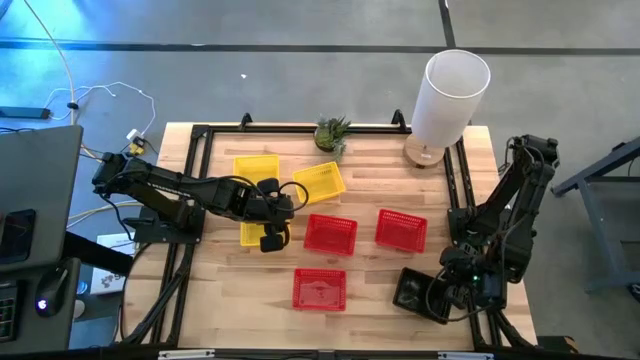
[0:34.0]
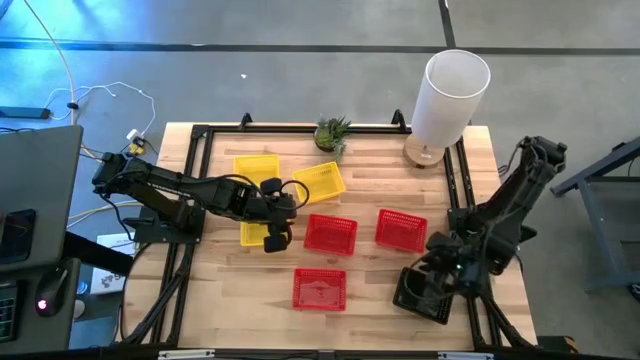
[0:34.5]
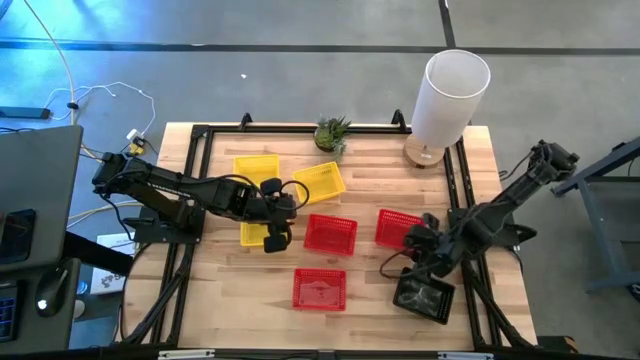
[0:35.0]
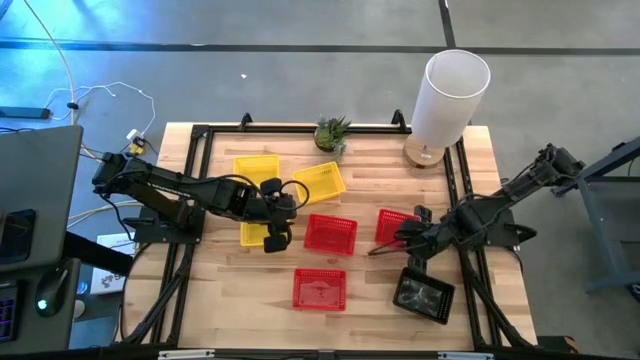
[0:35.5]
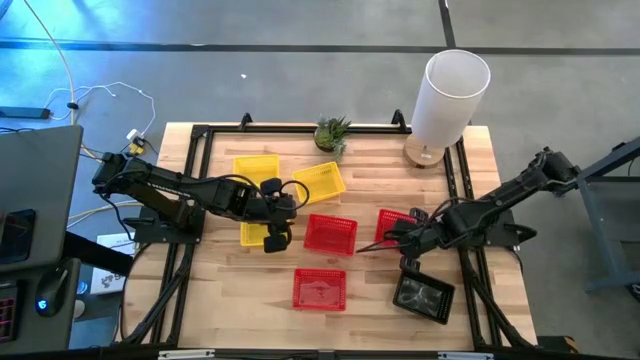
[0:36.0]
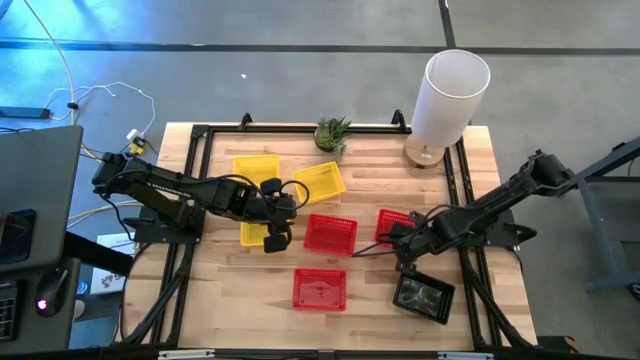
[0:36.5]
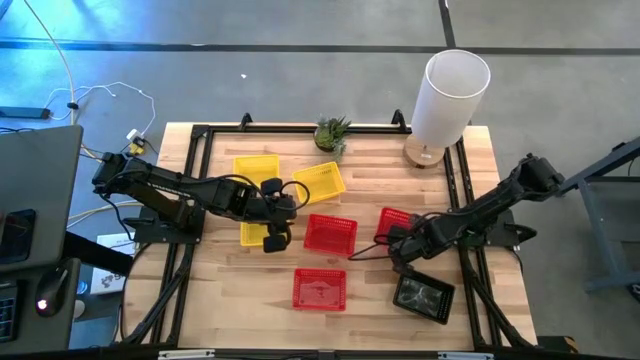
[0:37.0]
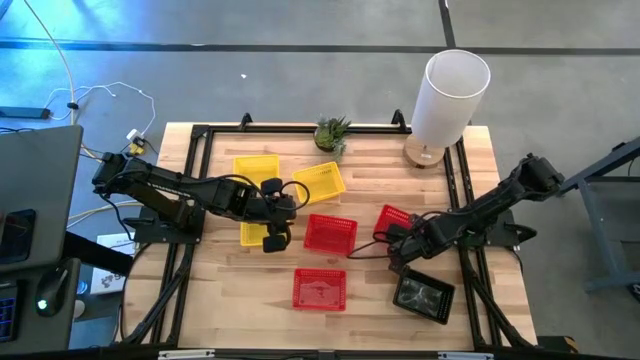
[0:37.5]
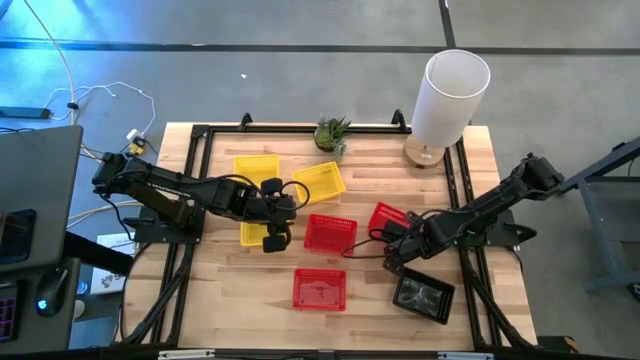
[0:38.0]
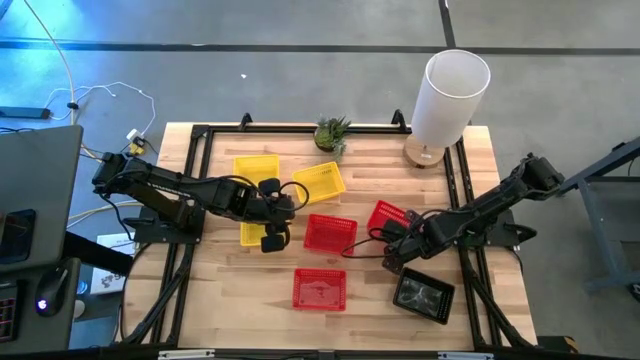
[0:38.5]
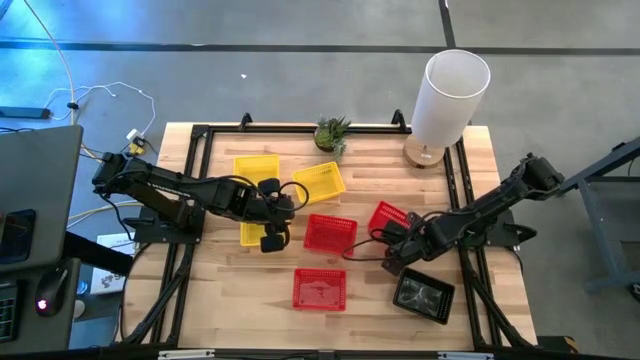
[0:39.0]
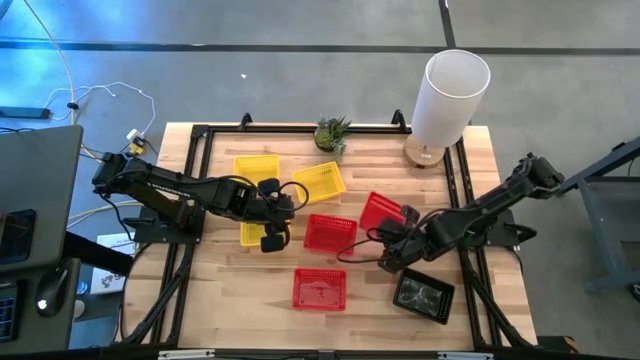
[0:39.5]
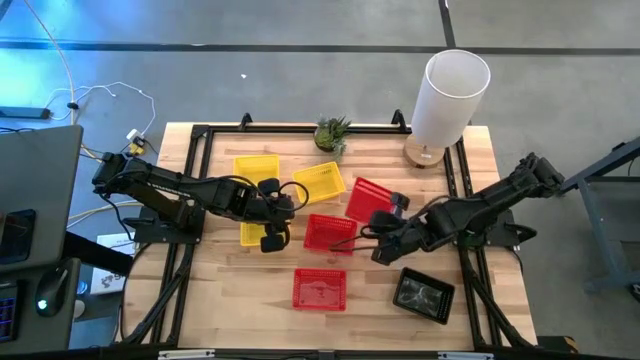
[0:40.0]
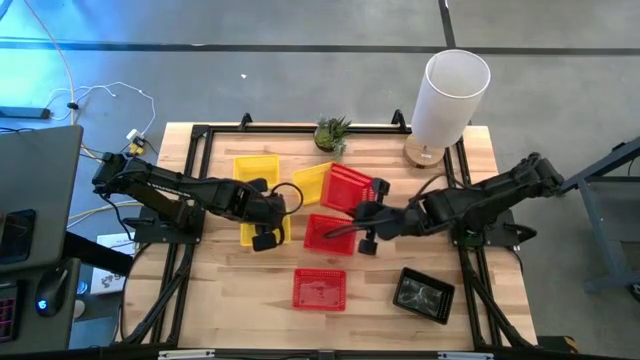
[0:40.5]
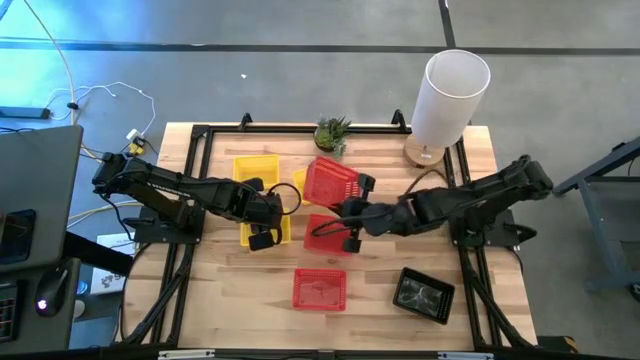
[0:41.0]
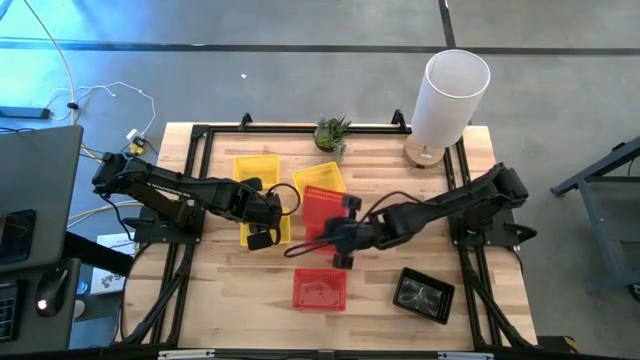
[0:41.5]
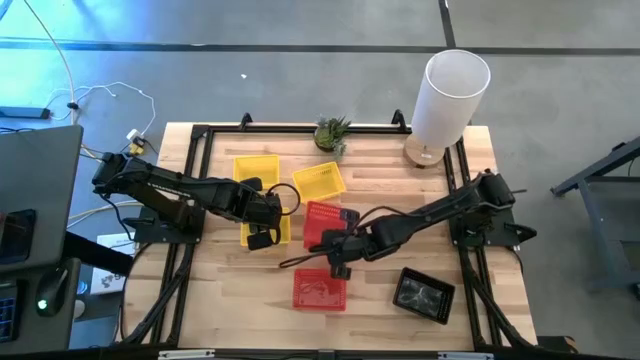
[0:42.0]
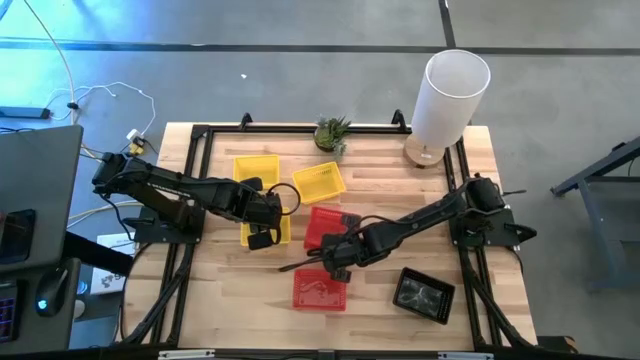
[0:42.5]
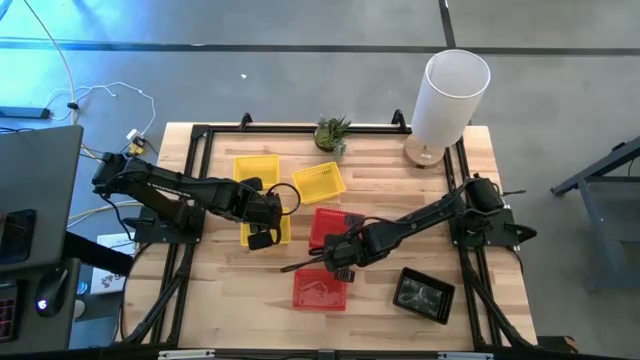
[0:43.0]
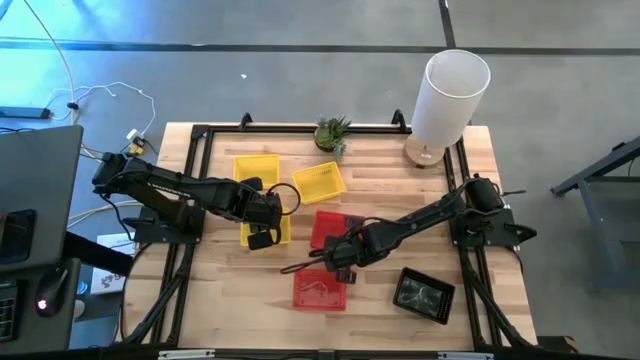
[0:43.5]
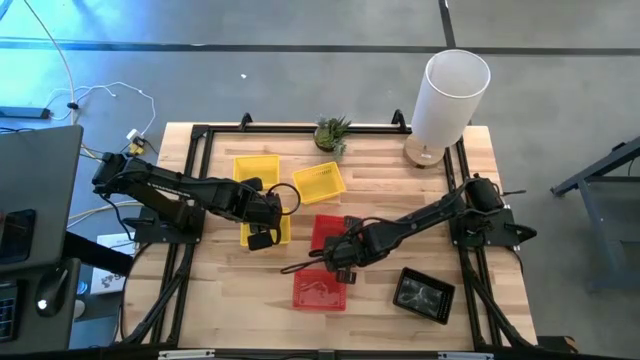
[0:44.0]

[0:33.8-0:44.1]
Stack the top right red bin on top of the top left red bin

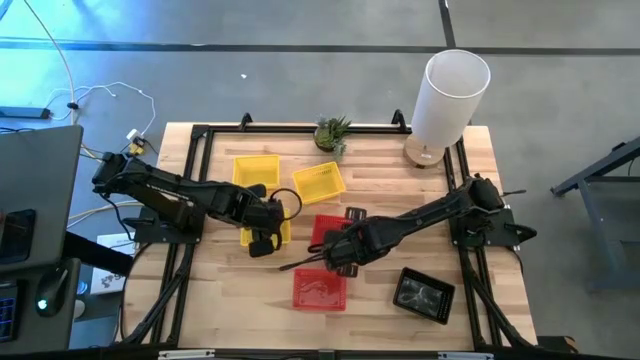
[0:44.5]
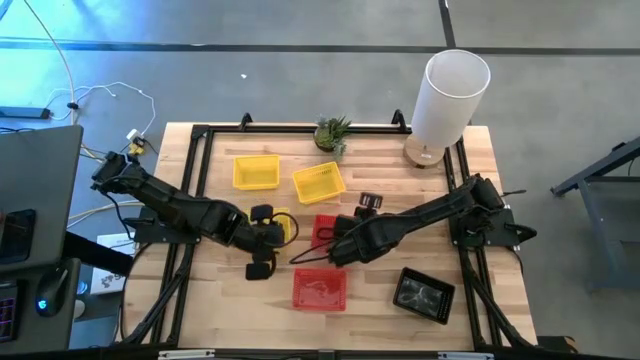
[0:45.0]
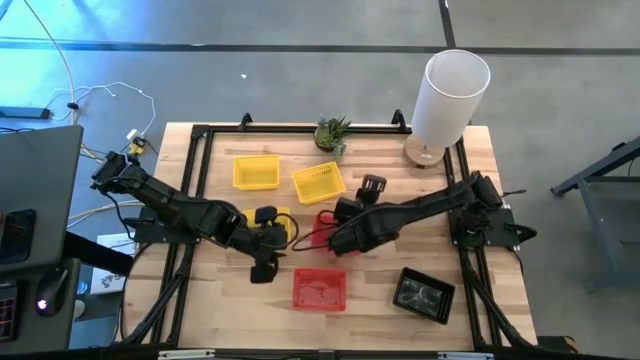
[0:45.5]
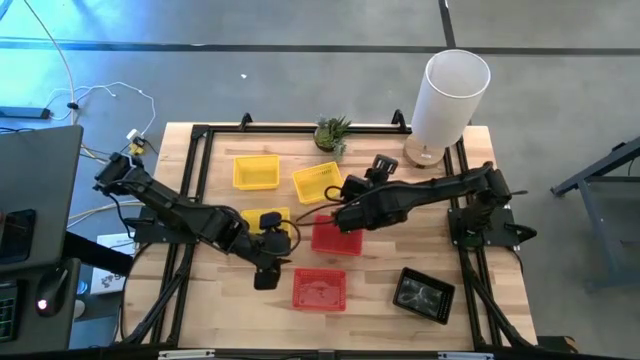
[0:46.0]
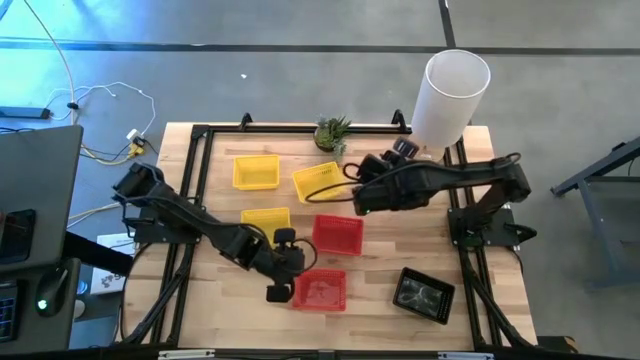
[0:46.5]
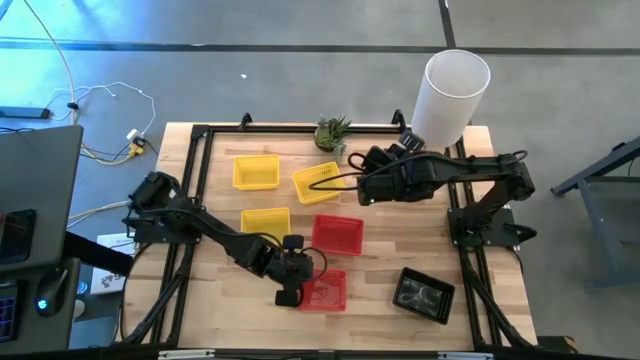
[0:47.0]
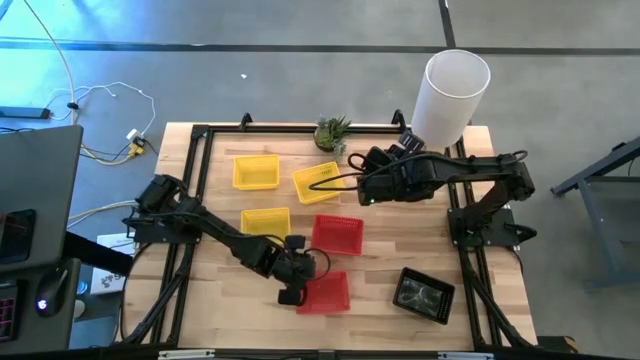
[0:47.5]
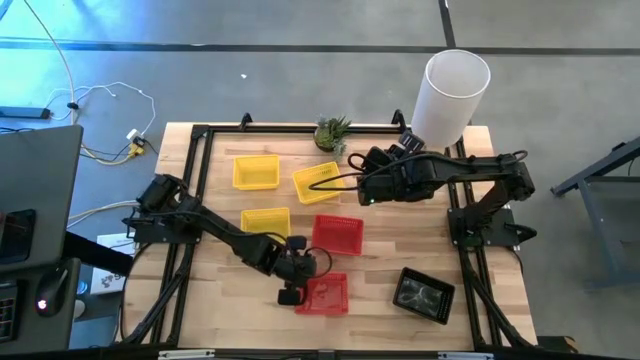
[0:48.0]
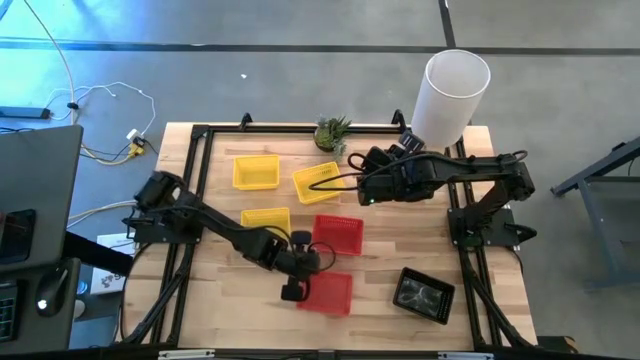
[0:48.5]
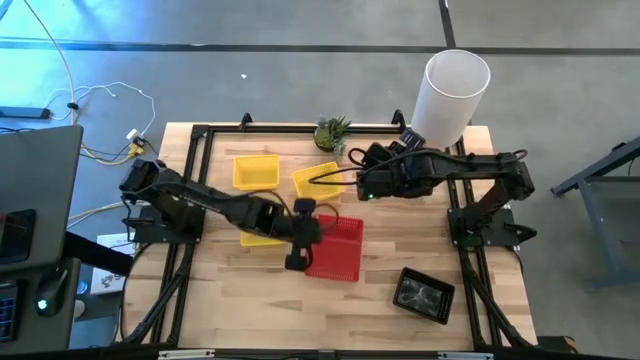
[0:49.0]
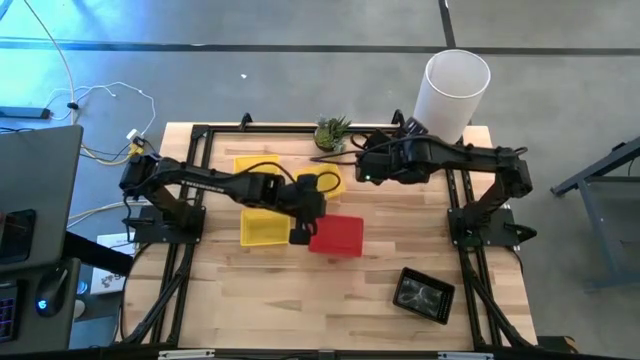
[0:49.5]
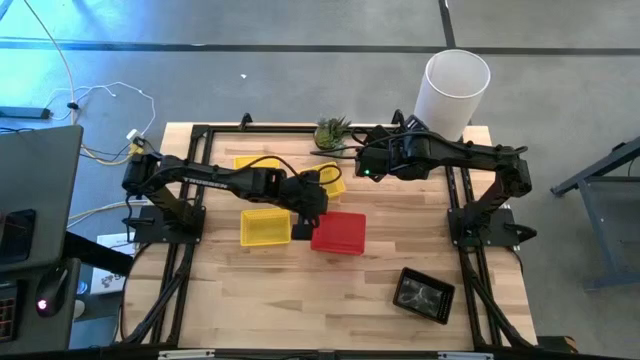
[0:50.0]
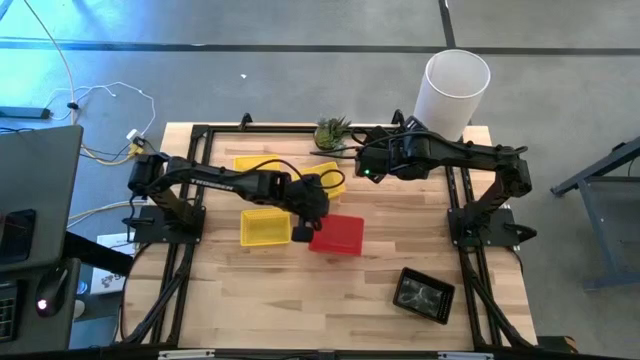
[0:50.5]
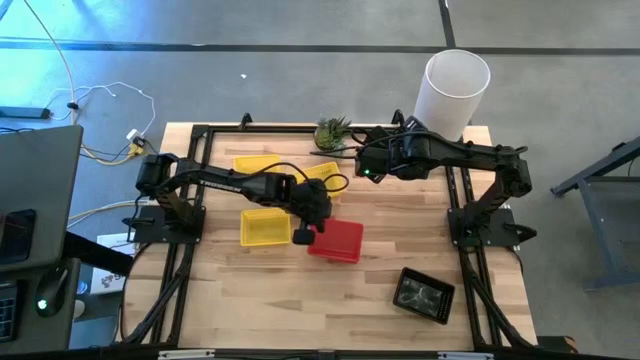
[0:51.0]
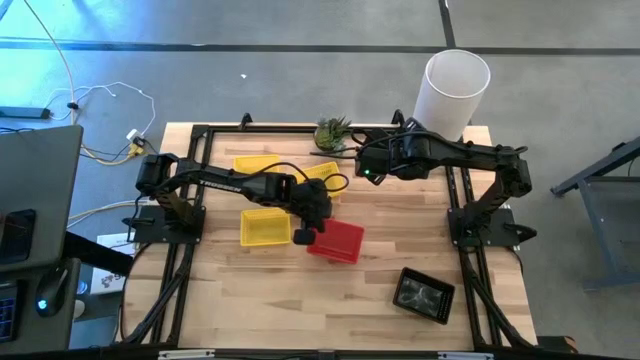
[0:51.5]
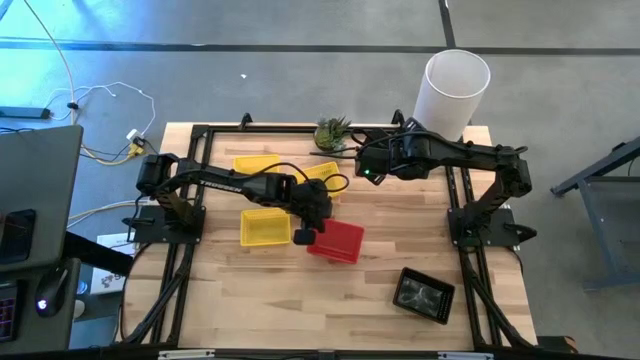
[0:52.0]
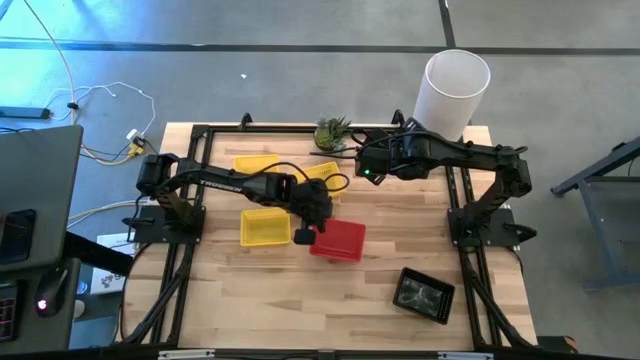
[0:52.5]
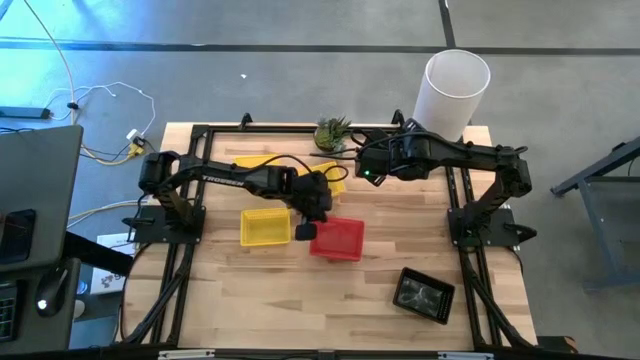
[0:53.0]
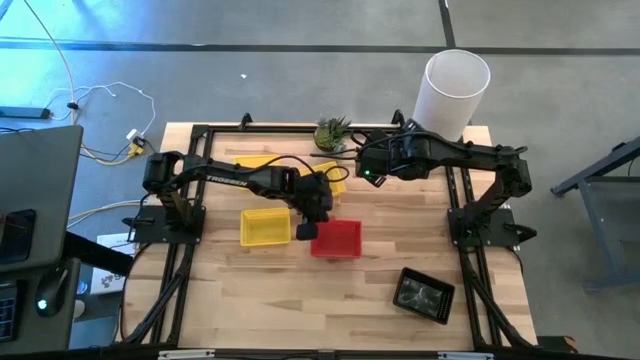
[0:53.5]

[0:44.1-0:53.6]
Stack the bottom red bin on top of the top stacked red bins
